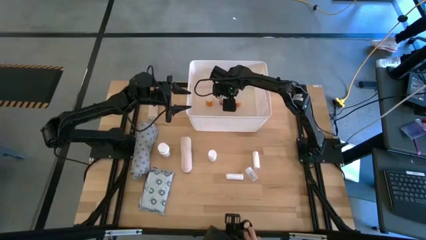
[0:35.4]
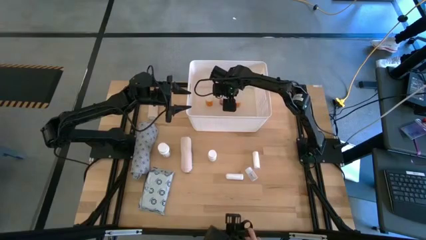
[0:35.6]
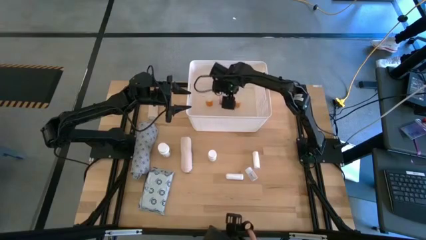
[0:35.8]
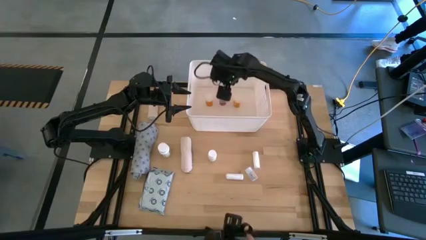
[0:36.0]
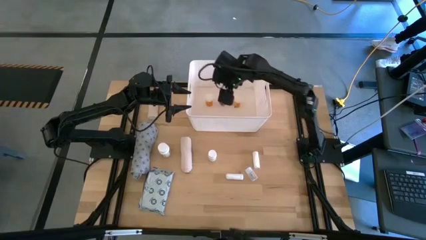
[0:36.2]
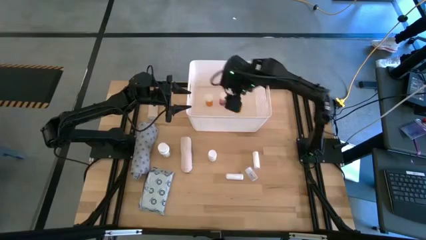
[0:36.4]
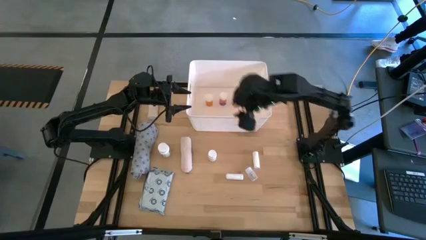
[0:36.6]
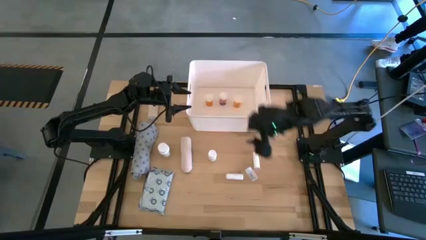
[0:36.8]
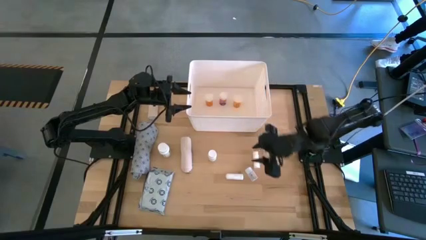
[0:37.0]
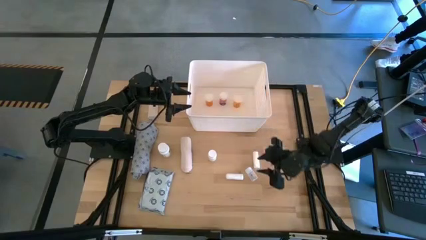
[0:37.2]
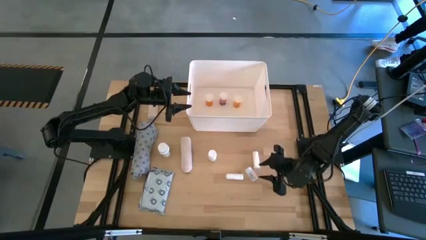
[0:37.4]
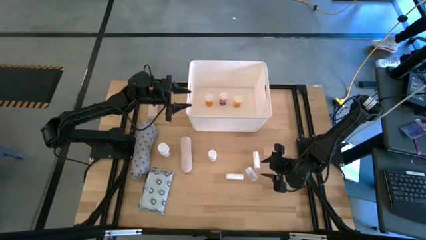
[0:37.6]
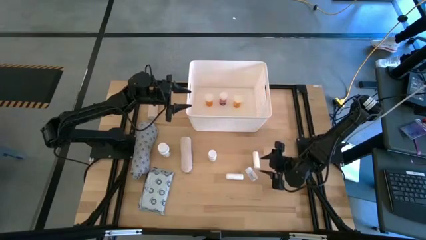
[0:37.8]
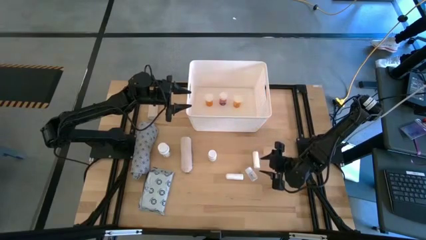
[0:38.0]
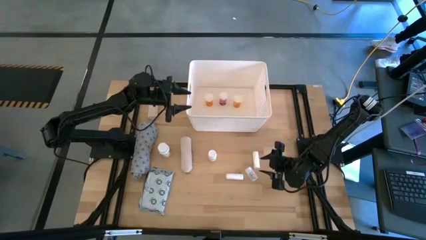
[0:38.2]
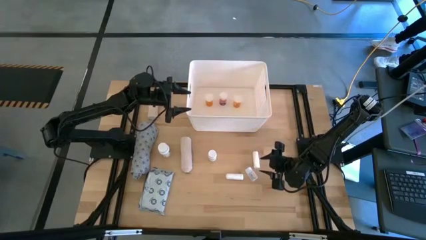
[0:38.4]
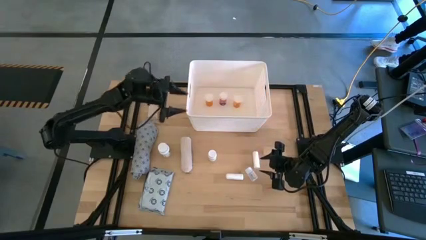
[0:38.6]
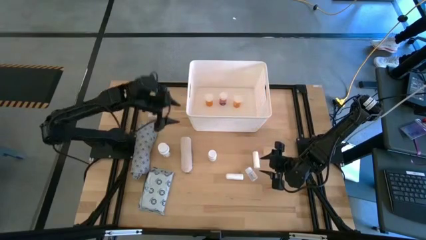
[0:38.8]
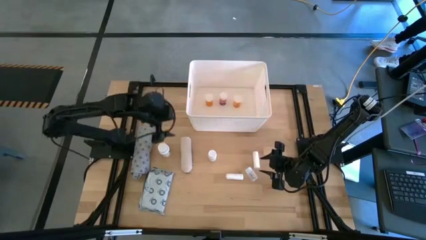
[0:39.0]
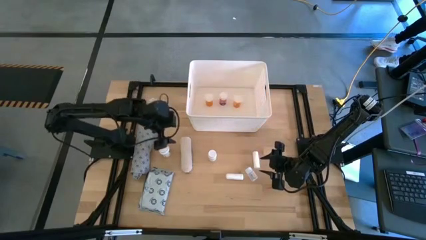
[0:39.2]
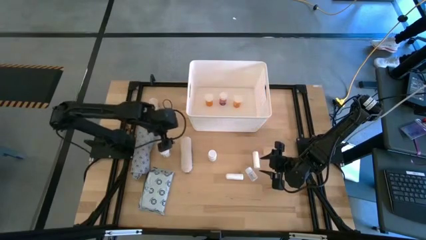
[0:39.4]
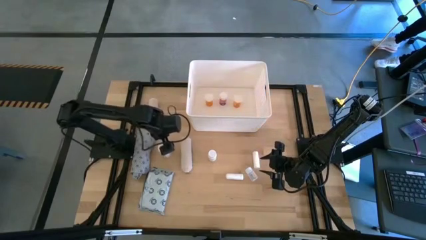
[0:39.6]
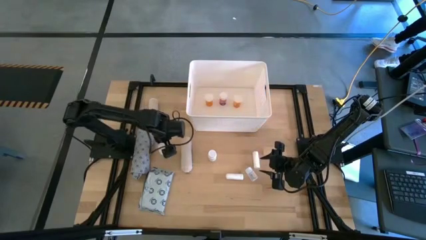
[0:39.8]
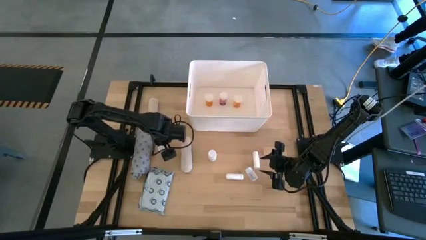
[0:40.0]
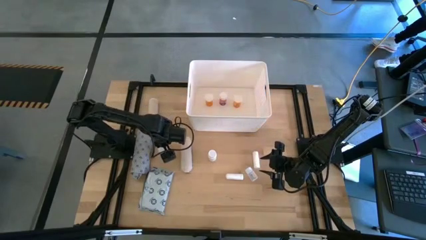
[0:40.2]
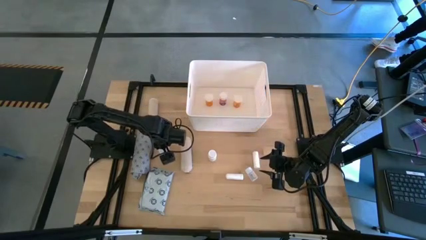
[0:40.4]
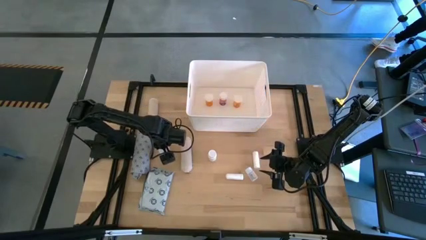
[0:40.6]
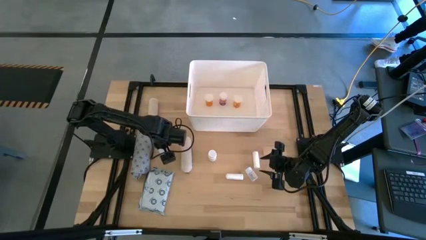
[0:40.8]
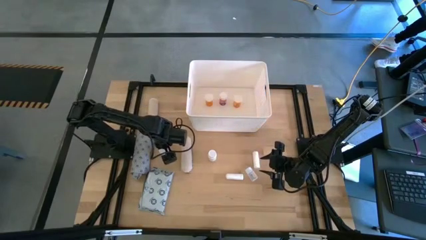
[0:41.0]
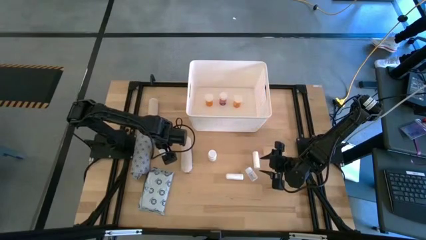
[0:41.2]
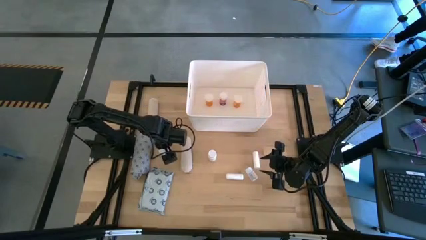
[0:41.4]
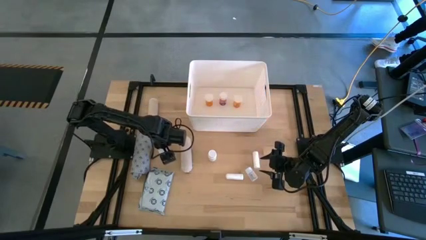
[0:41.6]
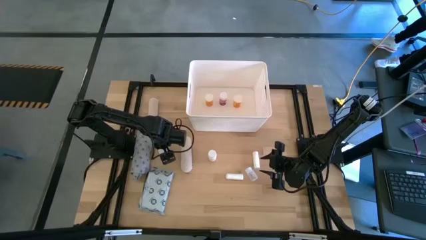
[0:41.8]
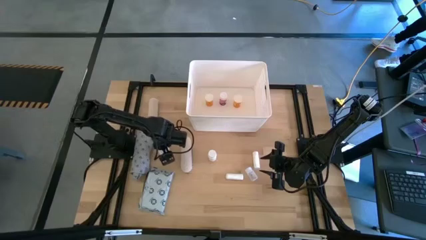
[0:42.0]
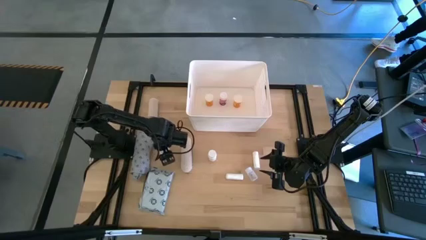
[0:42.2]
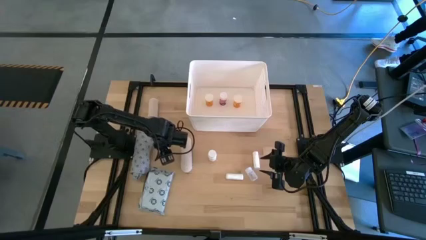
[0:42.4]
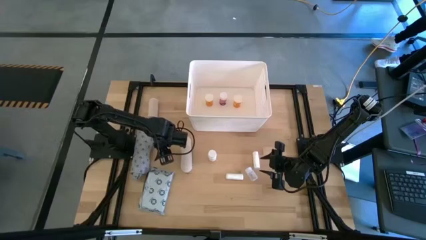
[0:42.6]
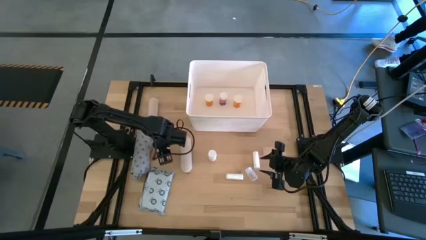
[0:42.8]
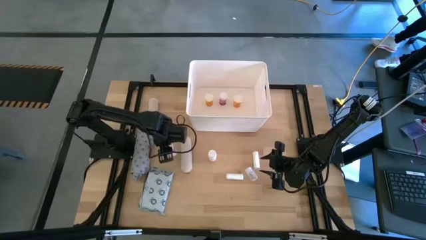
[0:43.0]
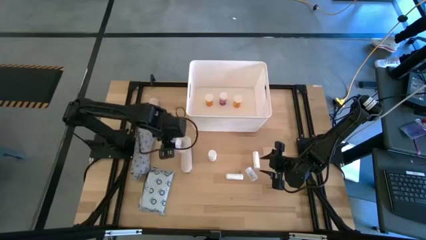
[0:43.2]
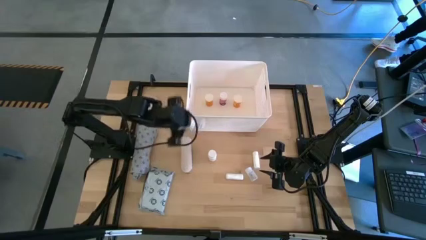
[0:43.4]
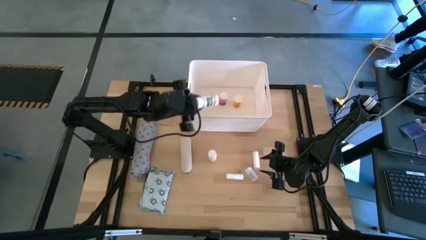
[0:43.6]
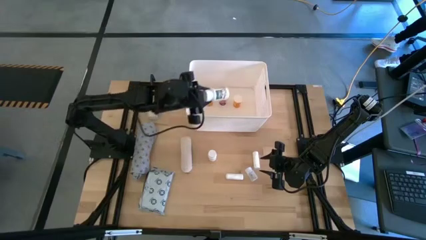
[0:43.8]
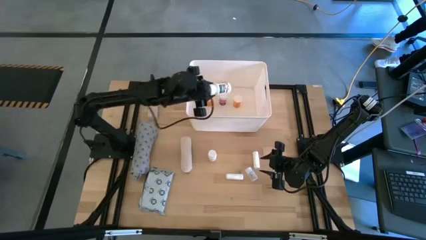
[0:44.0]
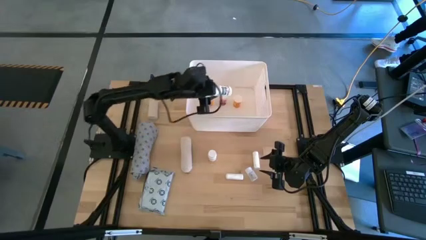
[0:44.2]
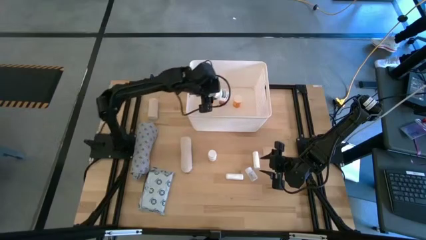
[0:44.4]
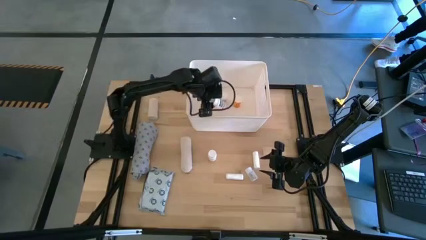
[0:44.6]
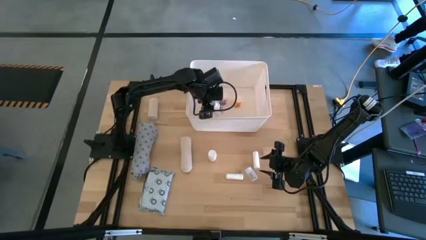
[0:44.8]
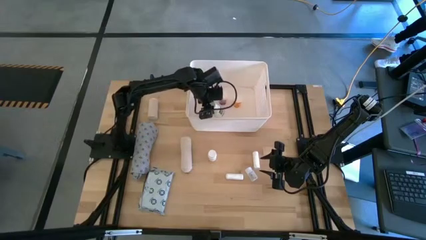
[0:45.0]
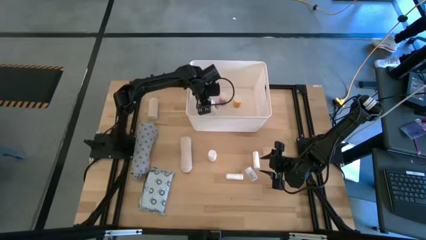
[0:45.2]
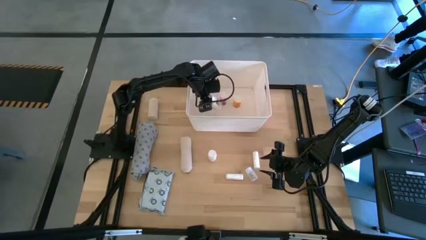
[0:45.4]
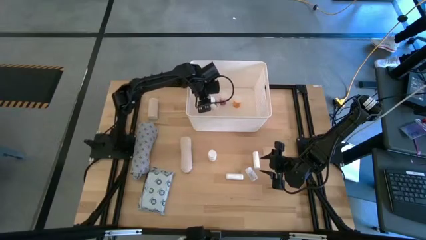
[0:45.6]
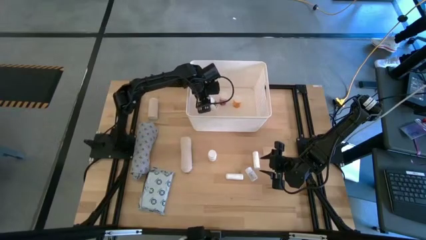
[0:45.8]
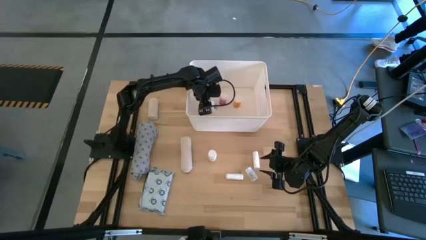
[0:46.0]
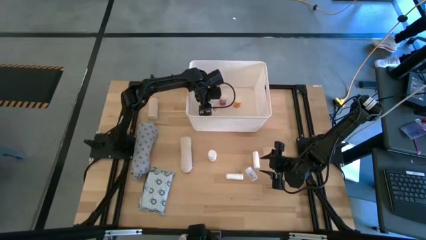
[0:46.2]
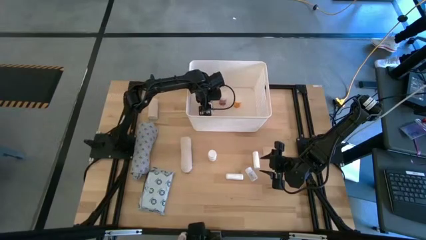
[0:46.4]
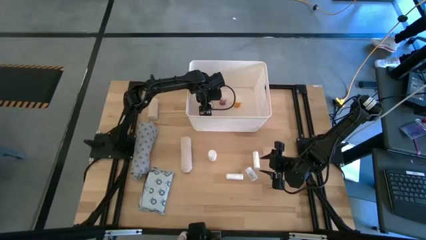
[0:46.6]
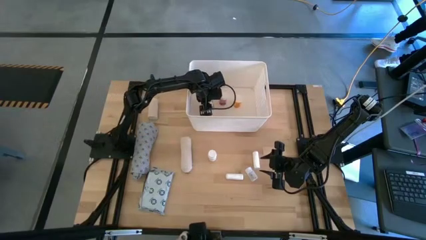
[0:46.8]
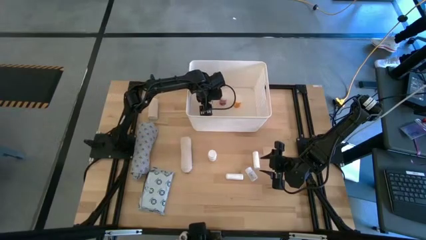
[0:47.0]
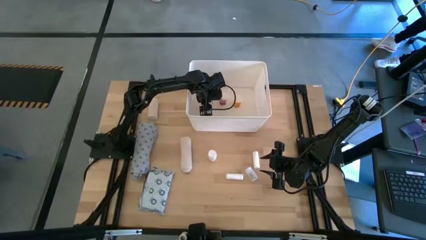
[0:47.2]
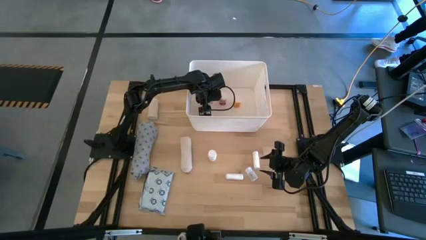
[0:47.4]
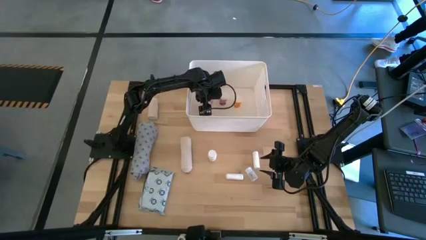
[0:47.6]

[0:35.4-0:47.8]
Task: Pick & place medical supplies in basket/bin
Put the white medicine bottle into the white bin

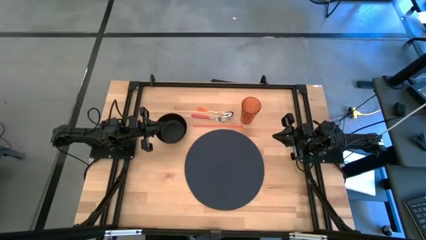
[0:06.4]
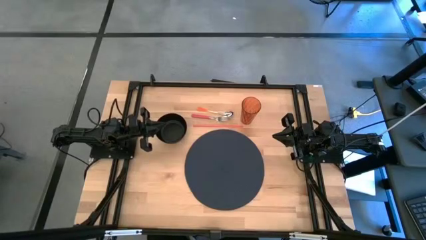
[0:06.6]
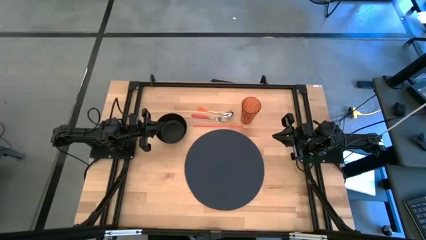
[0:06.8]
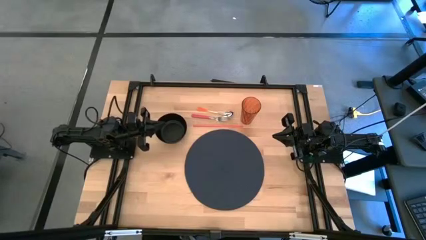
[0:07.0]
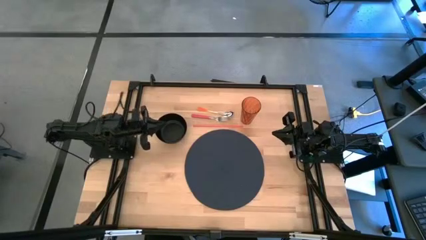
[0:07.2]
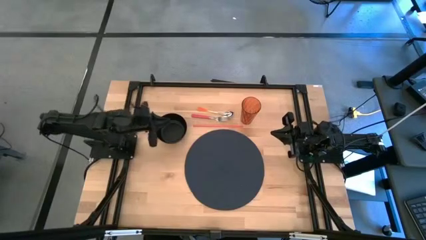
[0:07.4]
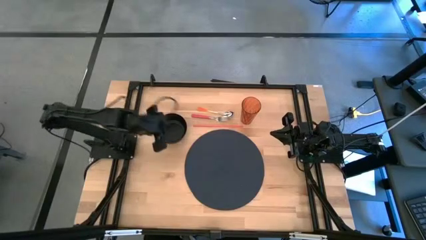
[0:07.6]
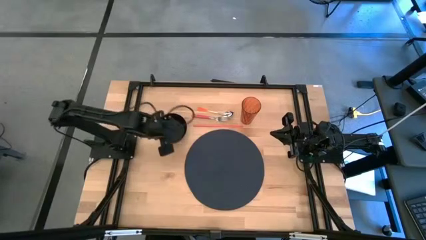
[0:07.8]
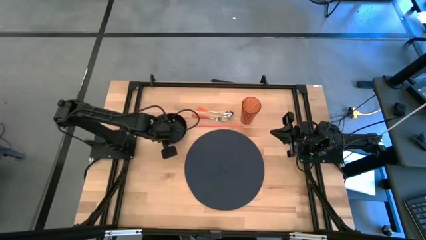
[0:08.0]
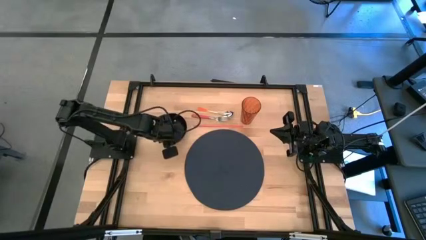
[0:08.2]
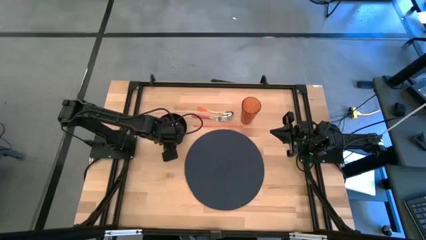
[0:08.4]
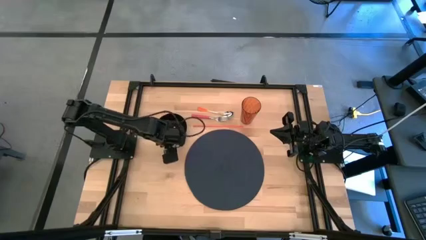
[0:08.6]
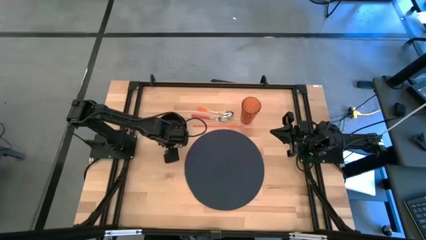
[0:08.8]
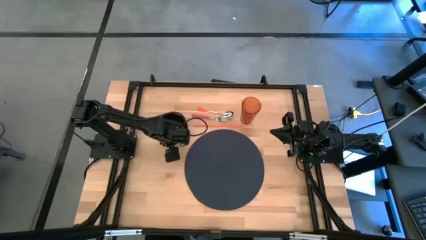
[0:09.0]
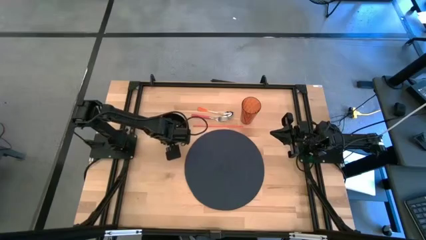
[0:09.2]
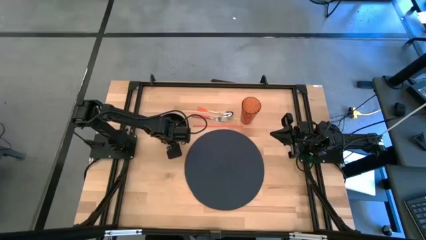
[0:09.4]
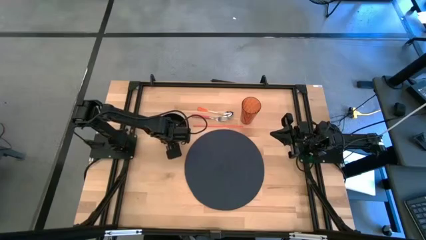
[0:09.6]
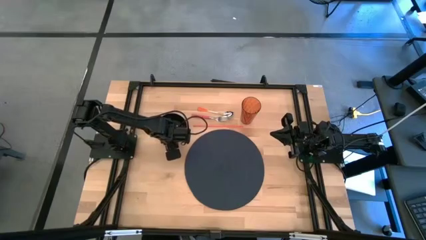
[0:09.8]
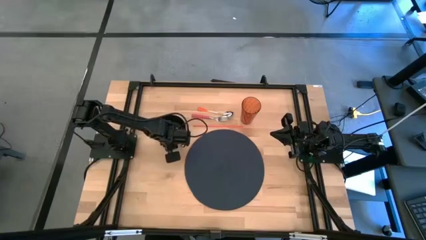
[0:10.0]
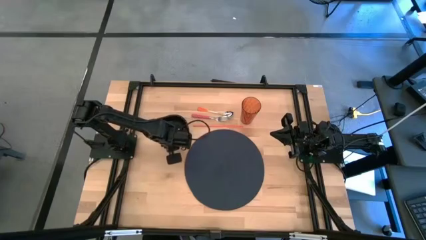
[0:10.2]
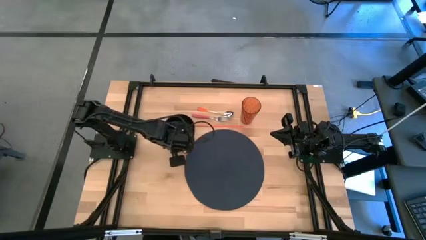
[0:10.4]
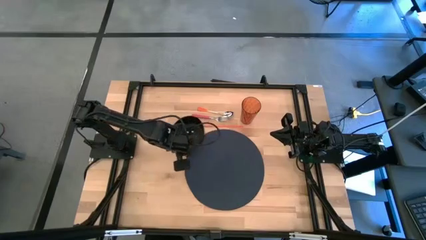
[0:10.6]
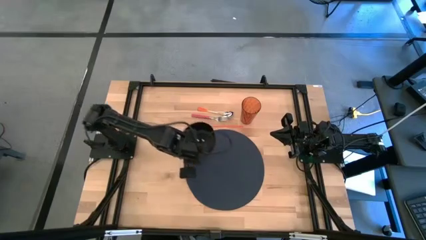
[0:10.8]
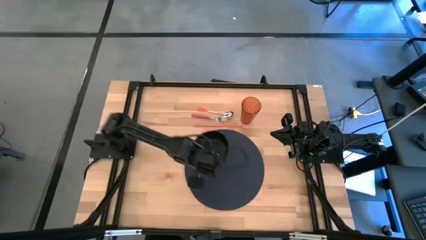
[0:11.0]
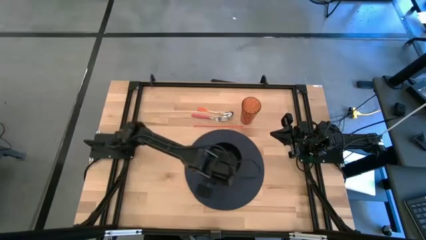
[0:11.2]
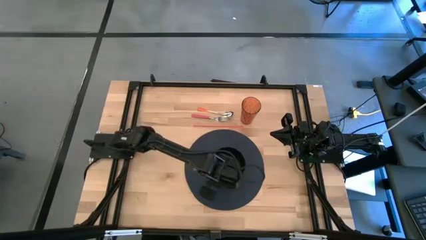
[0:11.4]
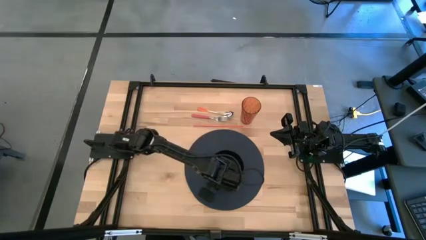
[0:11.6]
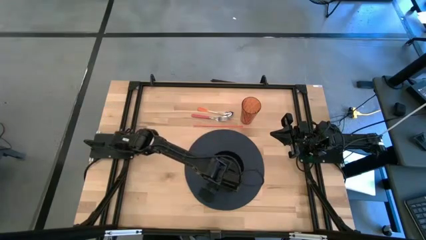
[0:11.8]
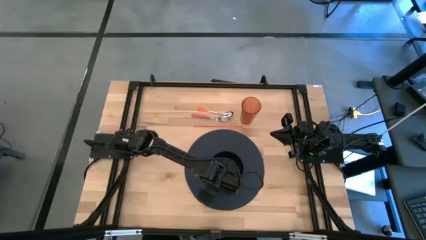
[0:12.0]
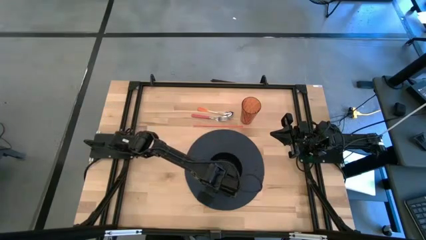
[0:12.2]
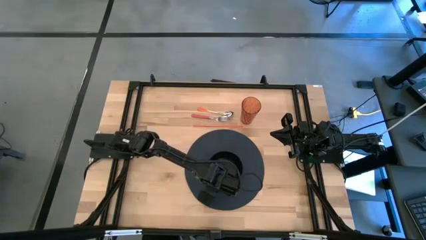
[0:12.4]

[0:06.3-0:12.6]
Task: Pick & Place Utensil
Put the black bowl on the blue mat
